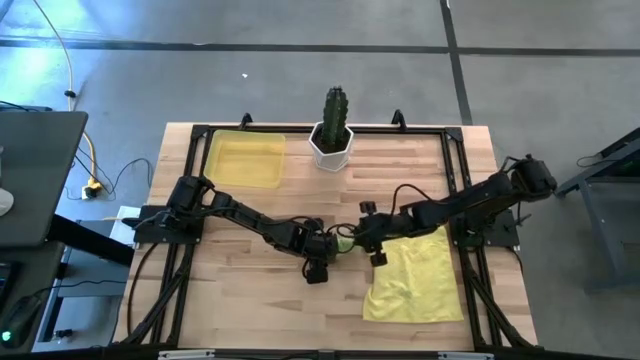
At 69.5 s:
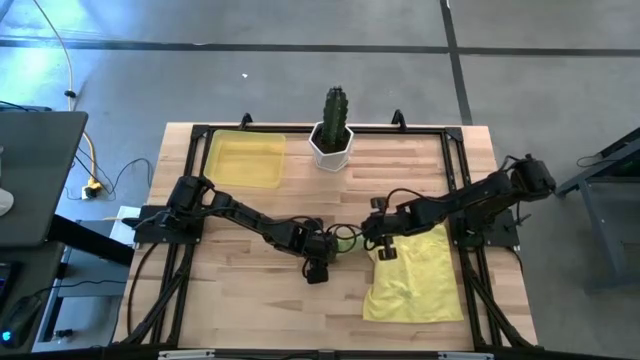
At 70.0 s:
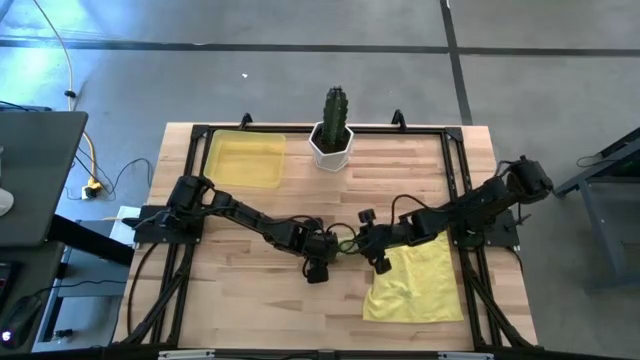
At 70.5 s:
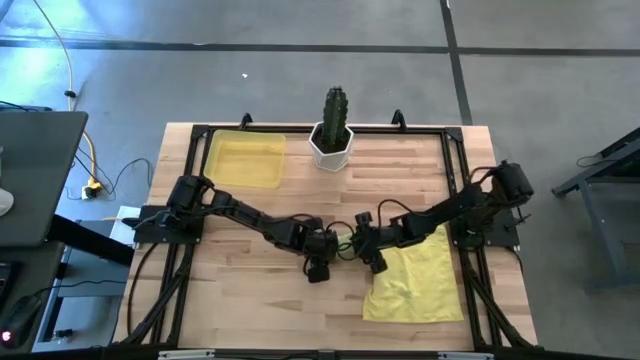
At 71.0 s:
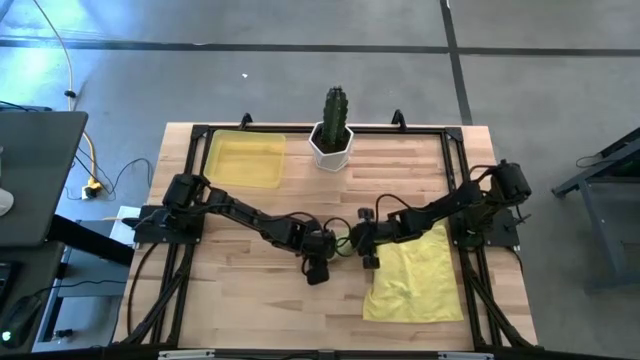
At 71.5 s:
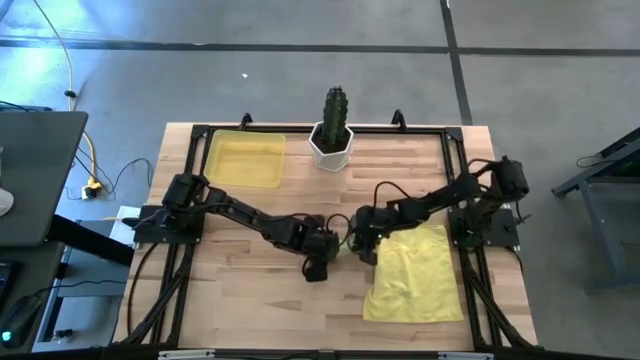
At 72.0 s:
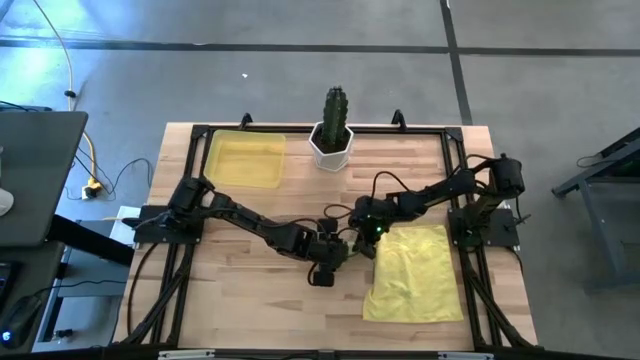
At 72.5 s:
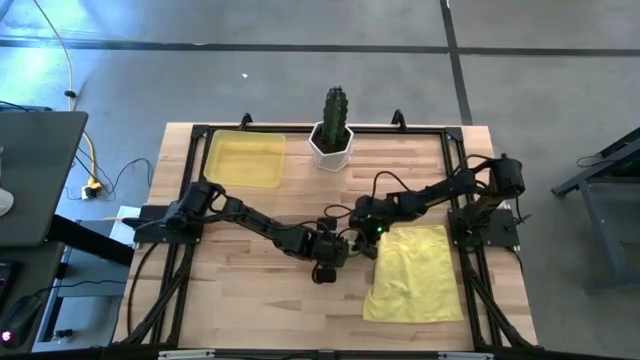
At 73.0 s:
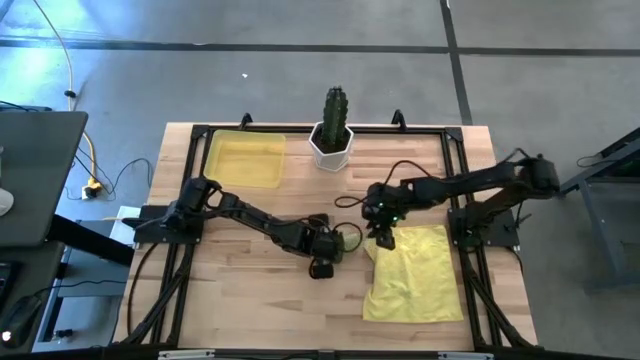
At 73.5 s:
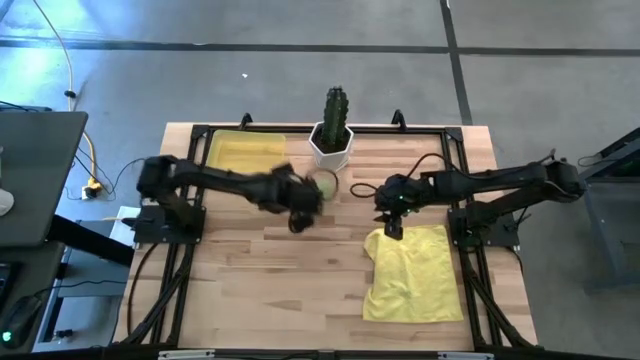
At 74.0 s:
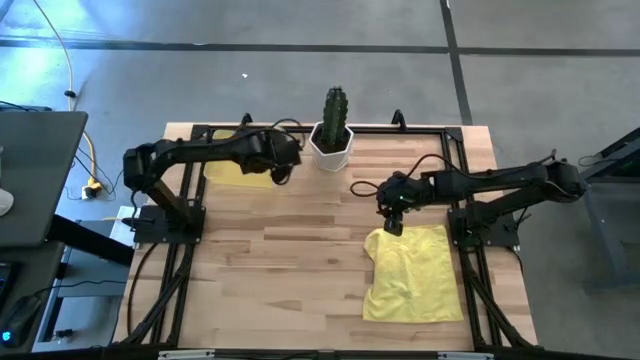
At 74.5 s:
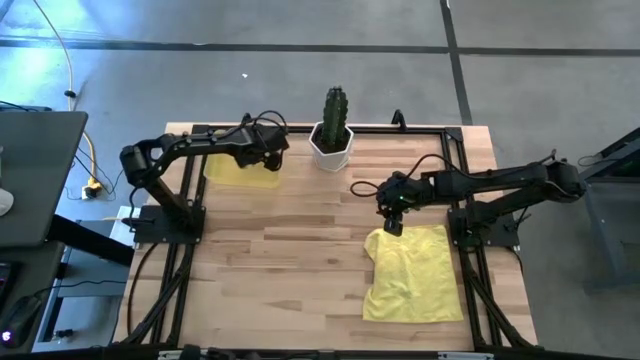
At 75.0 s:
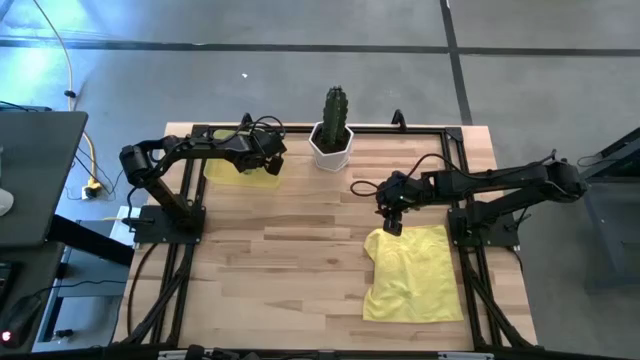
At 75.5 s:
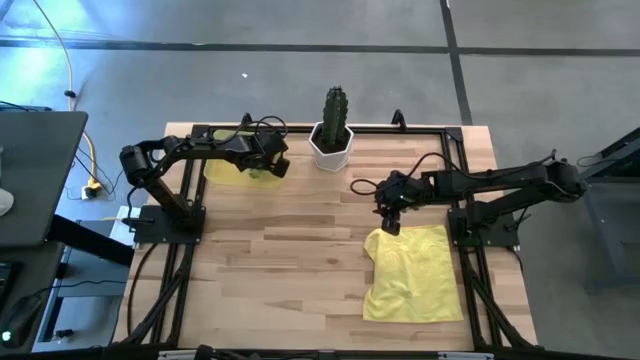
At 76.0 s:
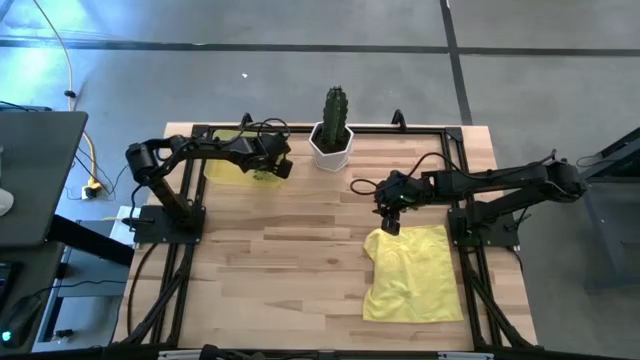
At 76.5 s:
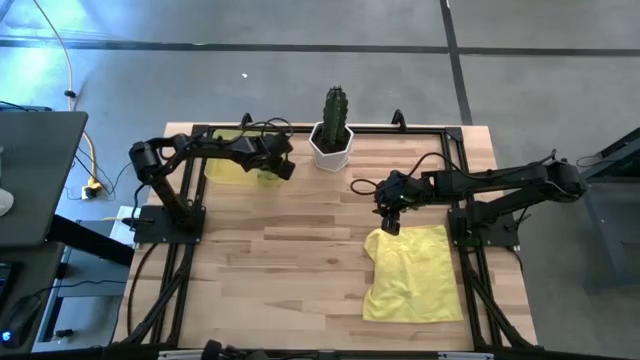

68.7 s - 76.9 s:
Task: Roll microfiber towels into tight, uniform cylinder then place into a basket
Put the rolled green microfiber towel into the yellow bin

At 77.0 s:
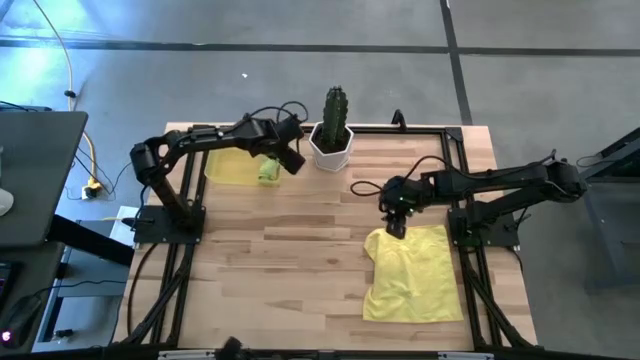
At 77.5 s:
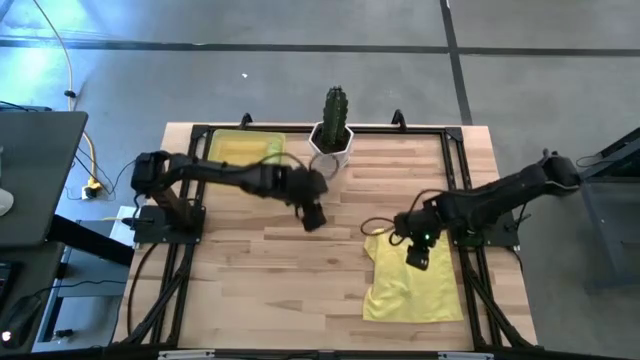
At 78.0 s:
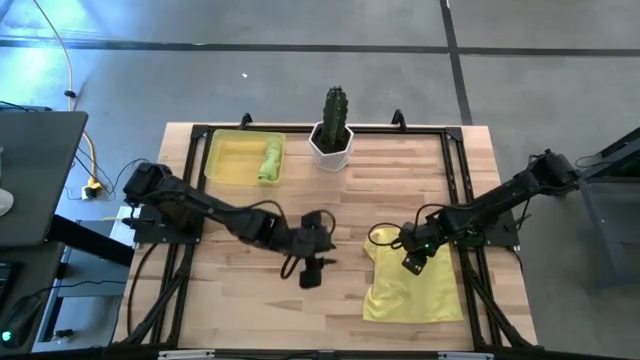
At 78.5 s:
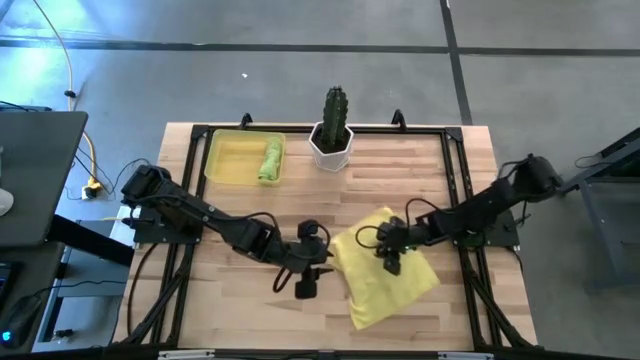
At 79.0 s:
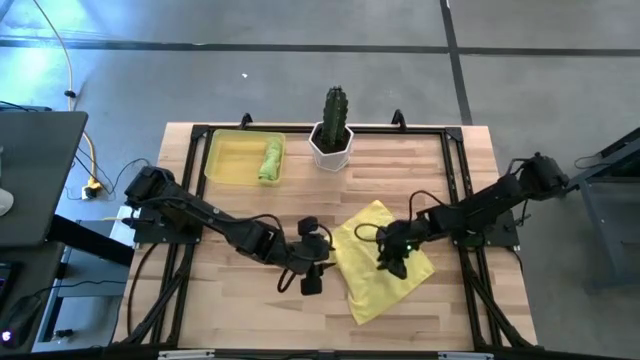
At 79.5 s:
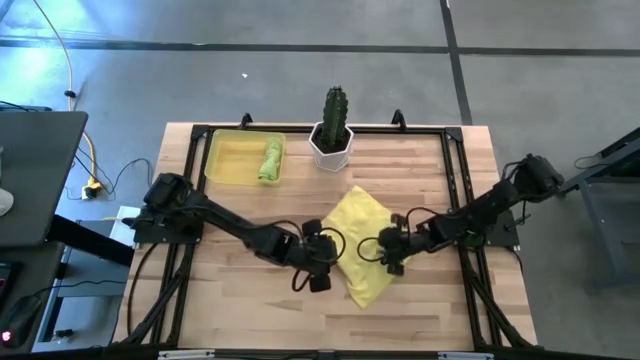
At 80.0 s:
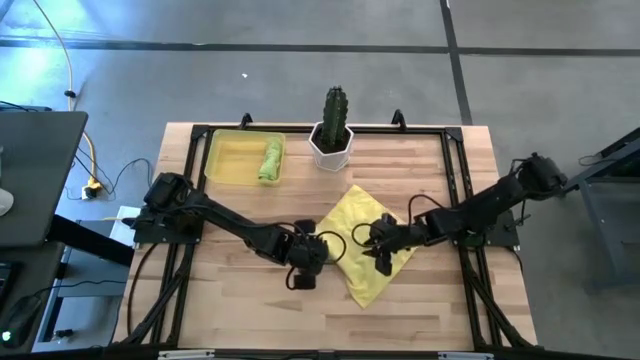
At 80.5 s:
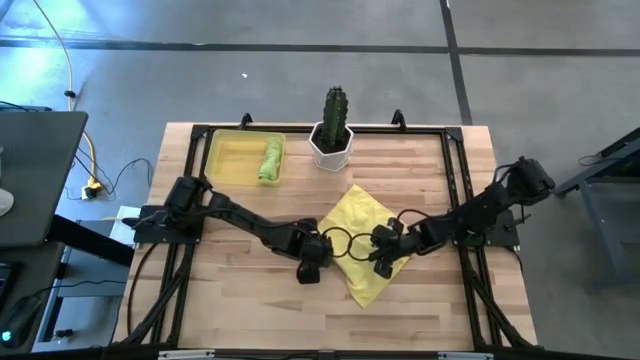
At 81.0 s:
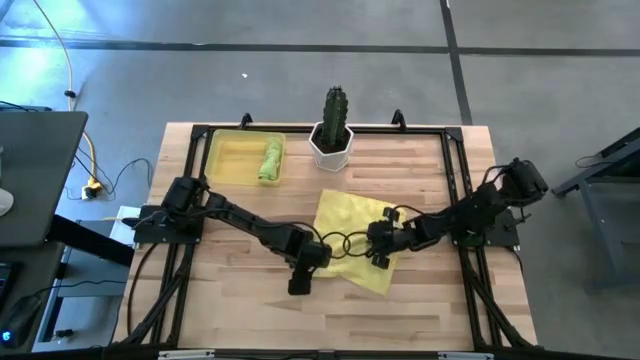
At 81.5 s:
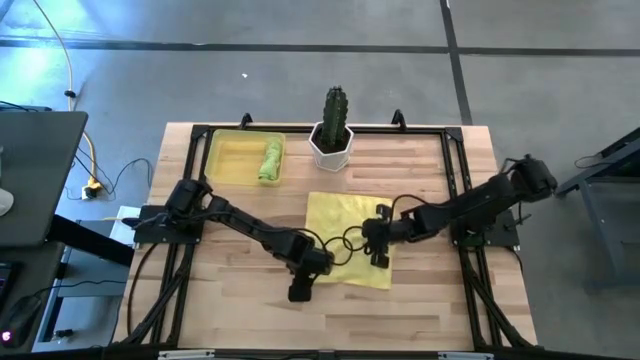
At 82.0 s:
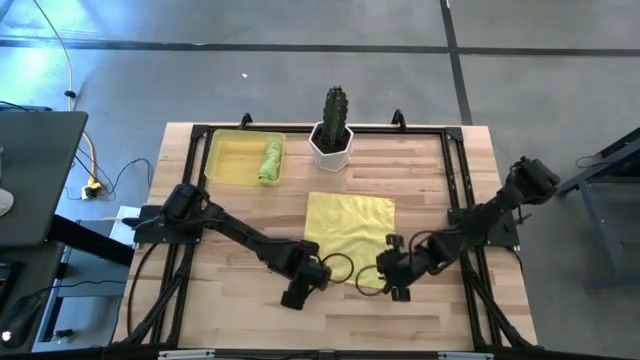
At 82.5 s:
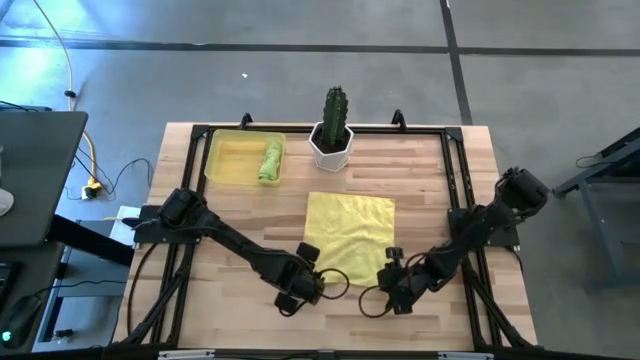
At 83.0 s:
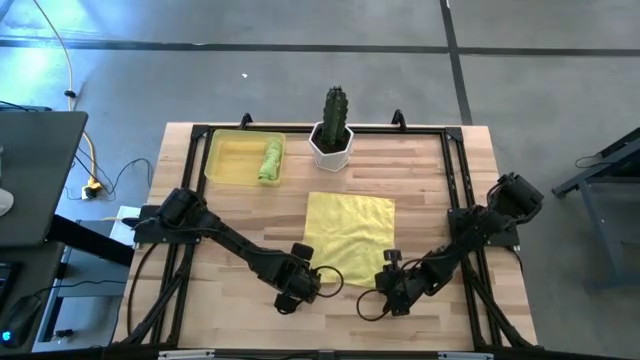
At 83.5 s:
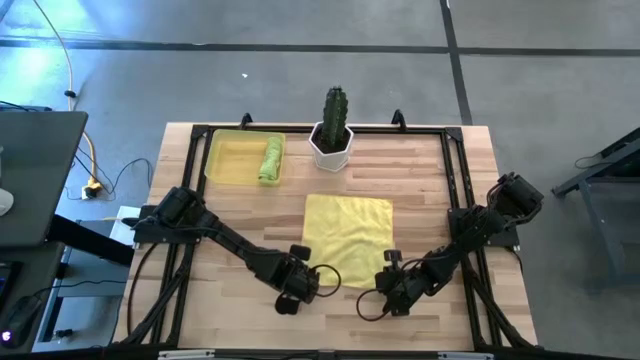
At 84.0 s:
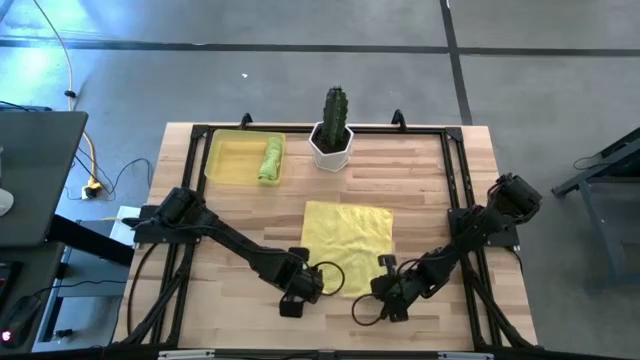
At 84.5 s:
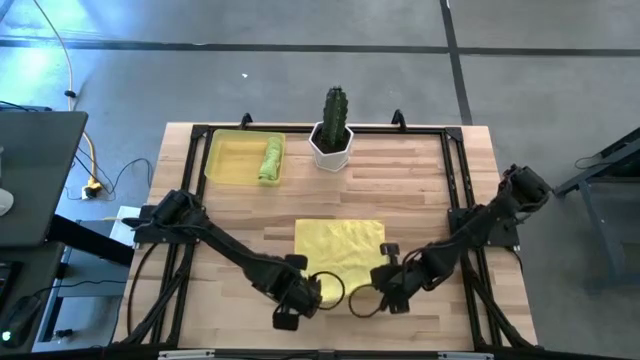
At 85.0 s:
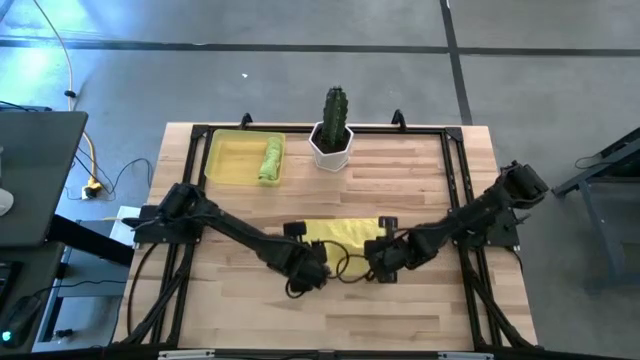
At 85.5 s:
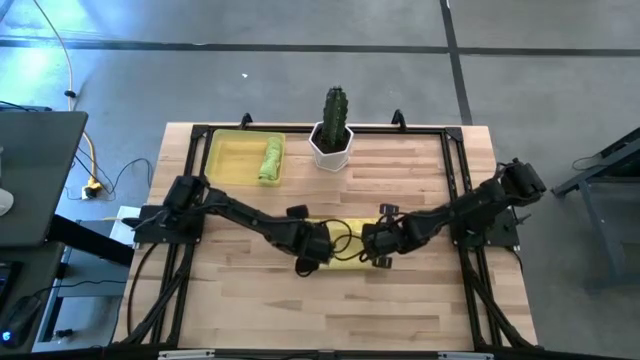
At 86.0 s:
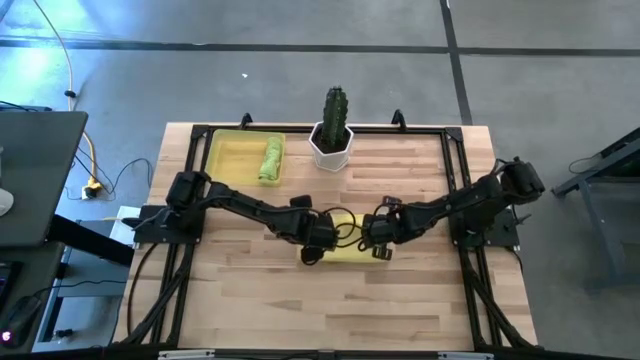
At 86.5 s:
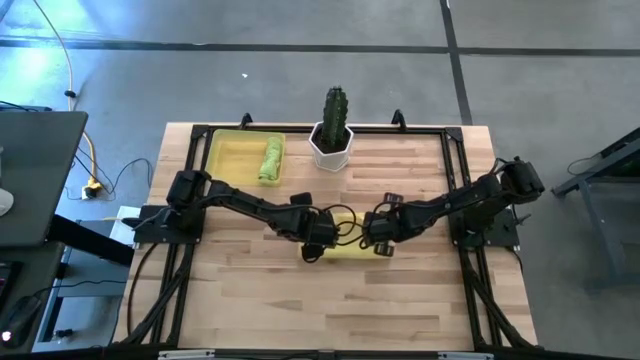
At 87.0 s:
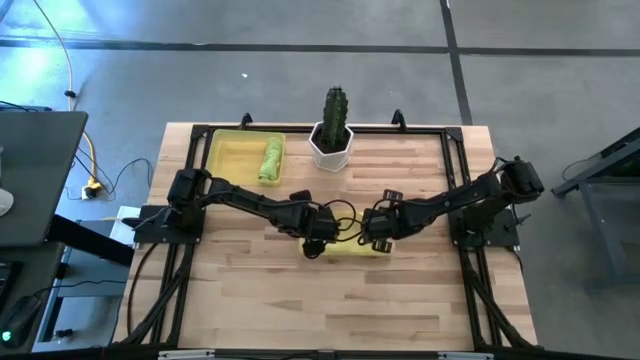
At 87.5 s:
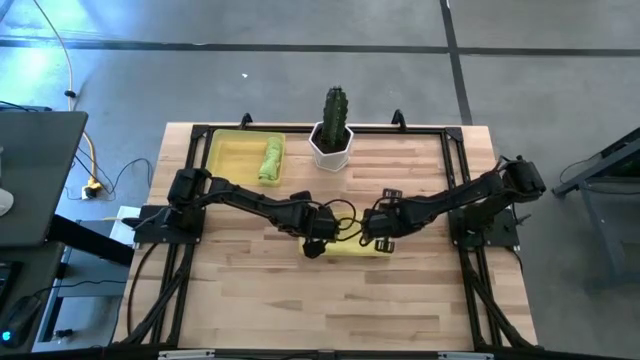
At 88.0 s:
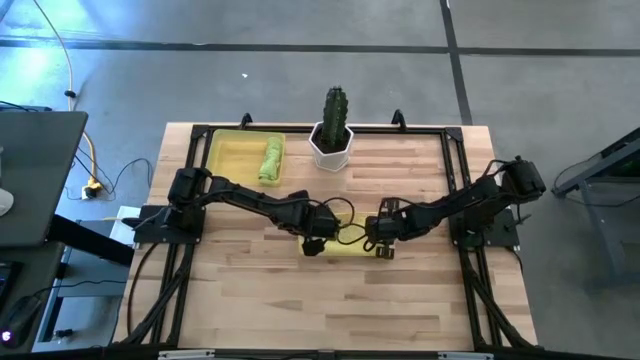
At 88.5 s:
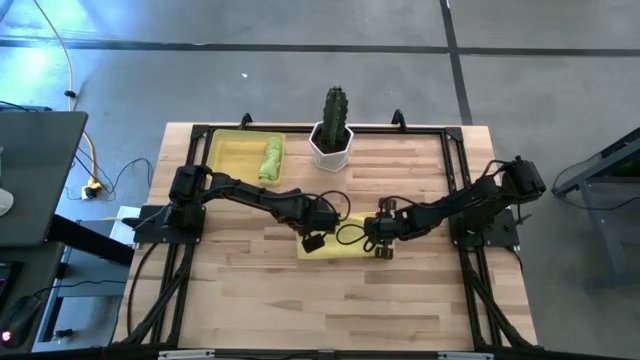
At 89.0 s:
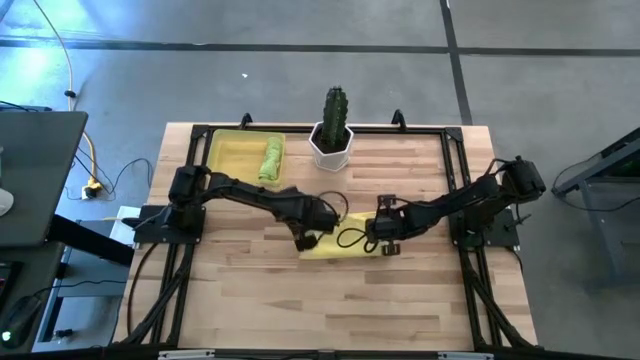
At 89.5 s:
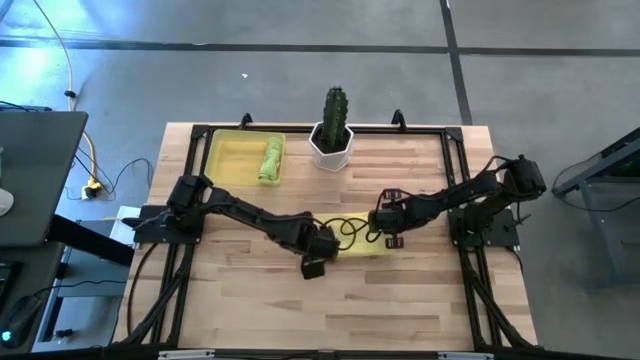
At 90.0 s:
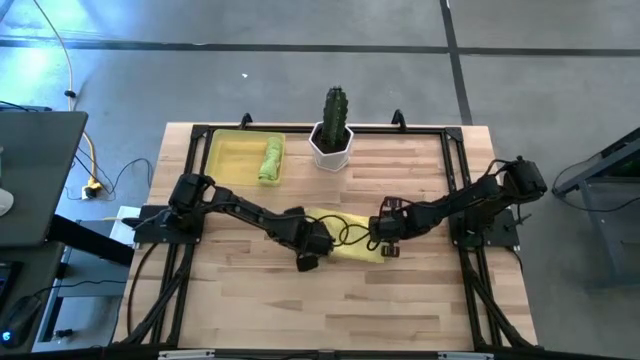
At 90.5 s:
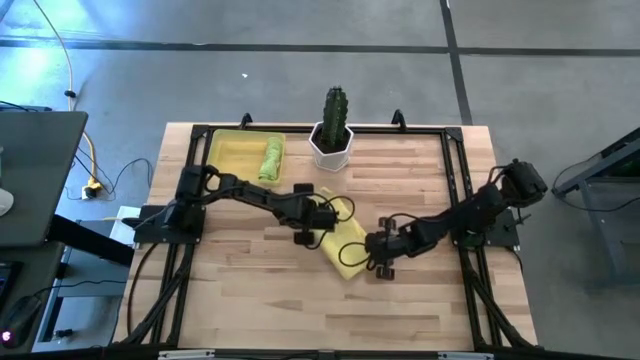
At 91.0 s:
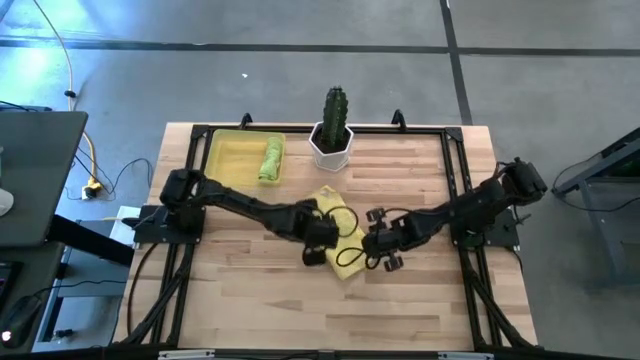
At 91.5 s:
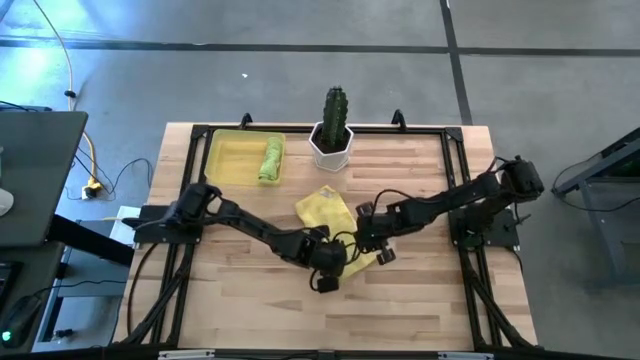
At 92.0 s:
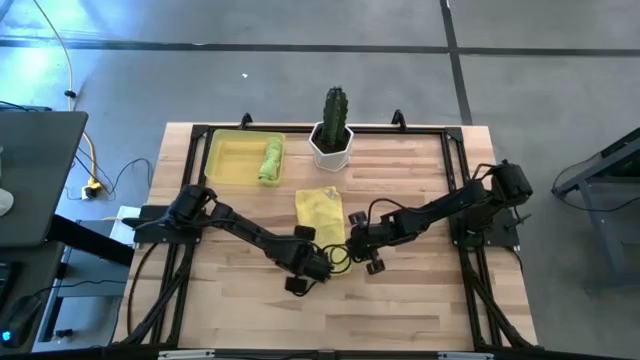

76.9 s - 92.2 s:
Fold the yellow microfiber towel
